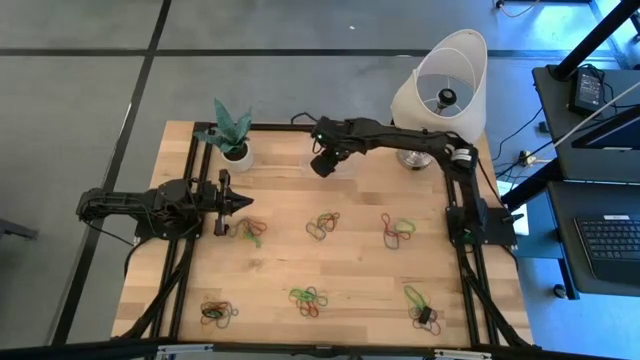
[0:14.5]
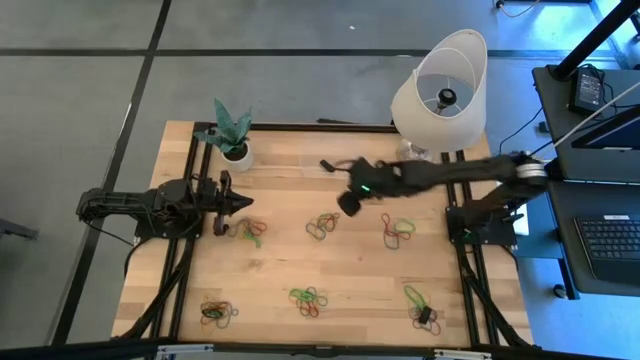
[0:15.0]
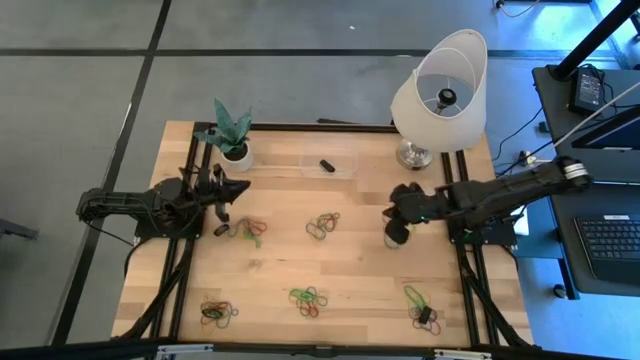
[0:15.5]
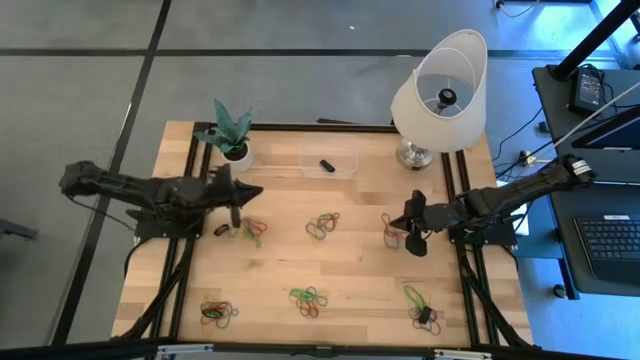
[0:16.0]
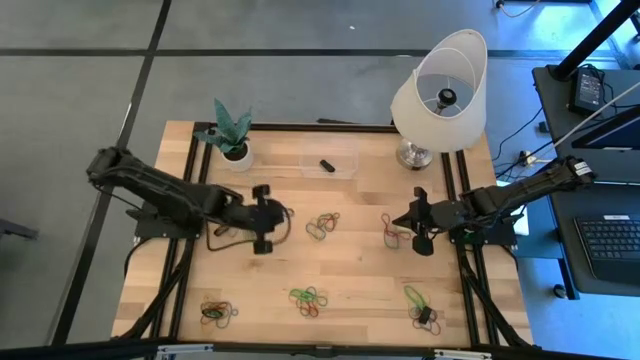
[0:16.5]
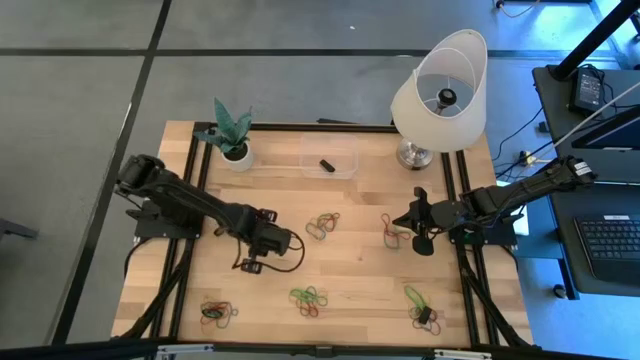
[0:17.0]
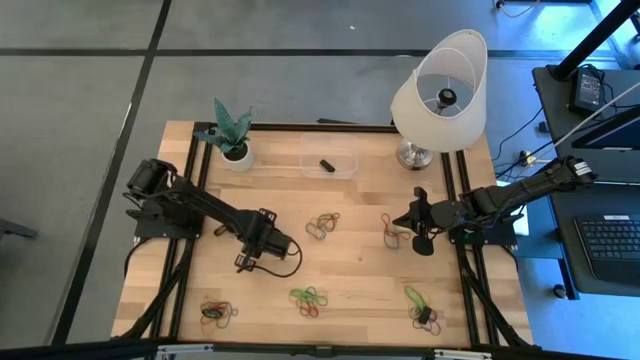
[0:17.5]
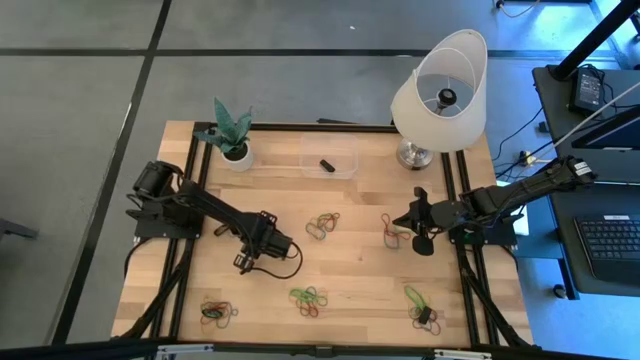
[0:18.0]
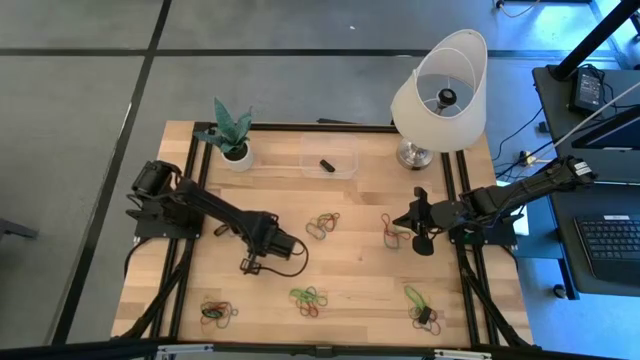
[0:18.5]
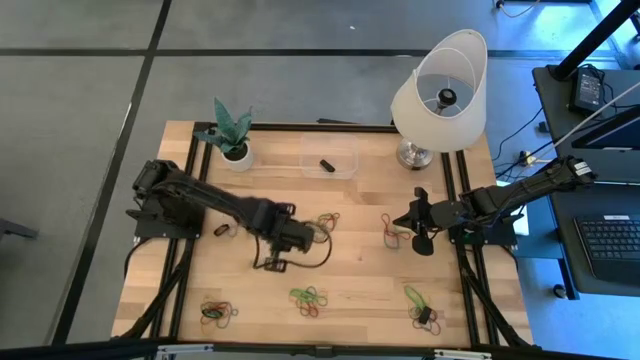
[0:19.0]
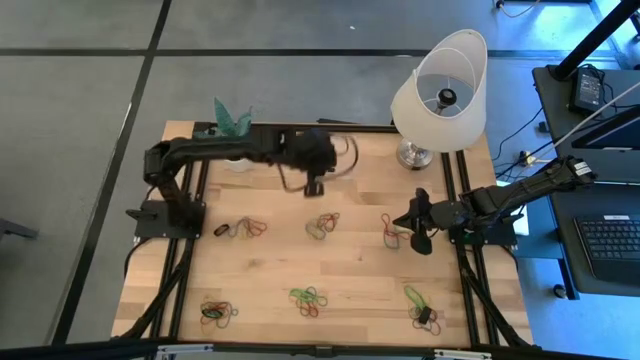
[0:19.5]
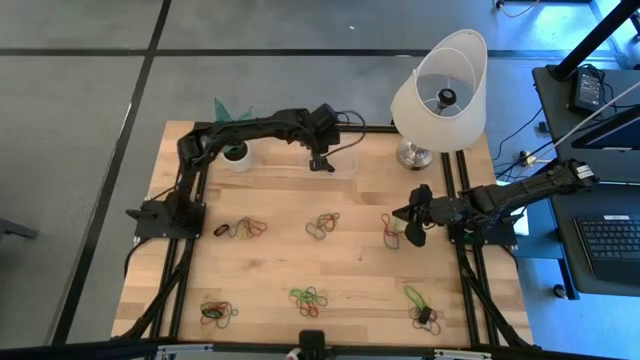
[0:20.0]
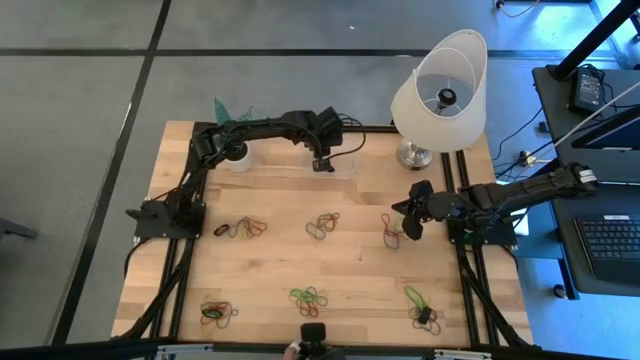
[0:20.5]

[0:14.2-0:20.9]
Task: Pick and place rubber bands into bin
Put the green rubber band into the transparent bin

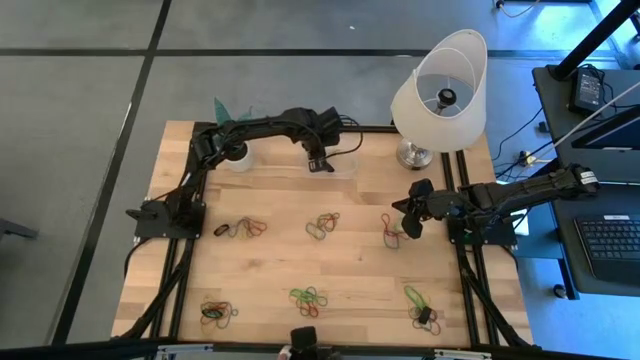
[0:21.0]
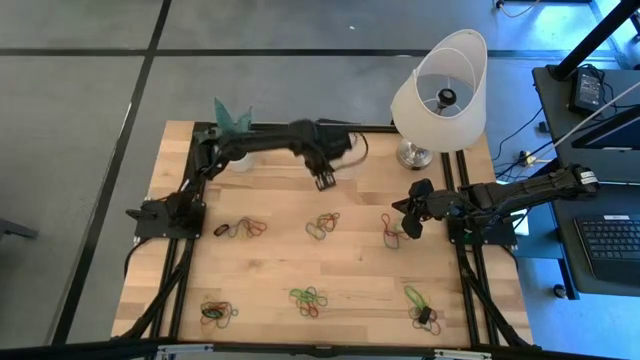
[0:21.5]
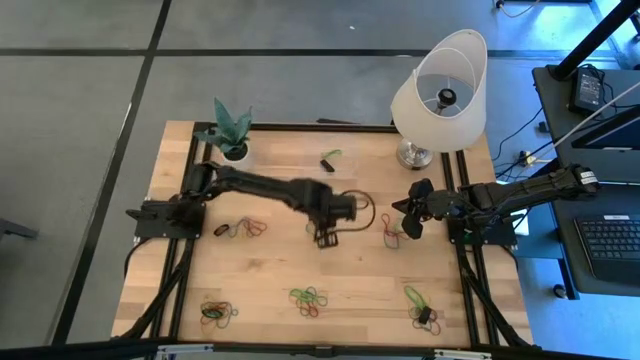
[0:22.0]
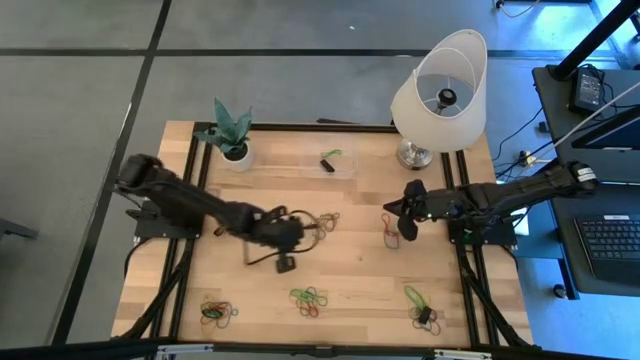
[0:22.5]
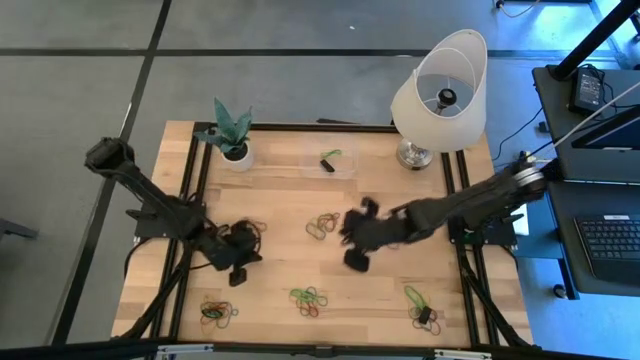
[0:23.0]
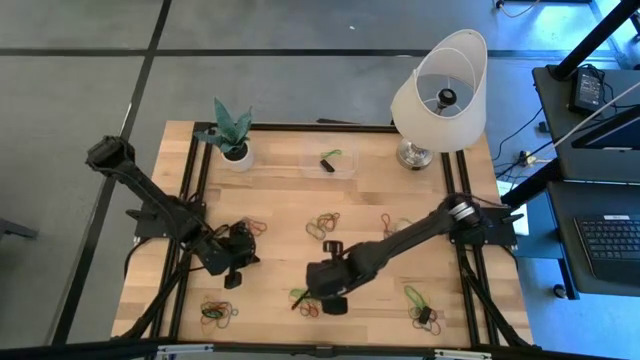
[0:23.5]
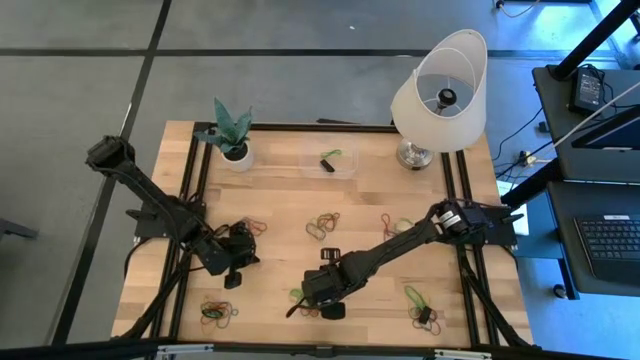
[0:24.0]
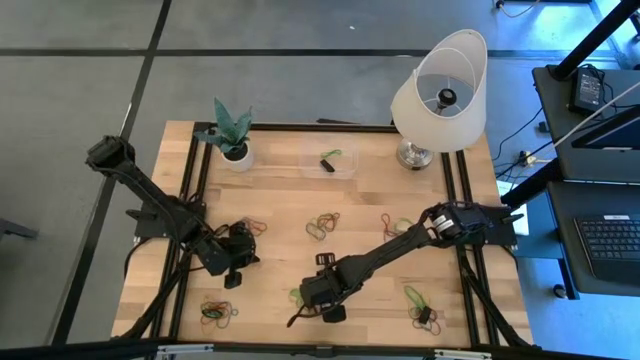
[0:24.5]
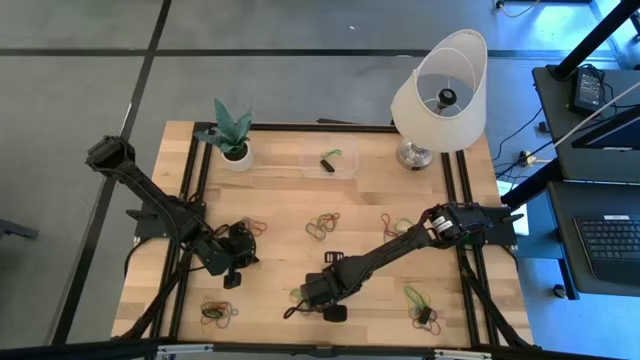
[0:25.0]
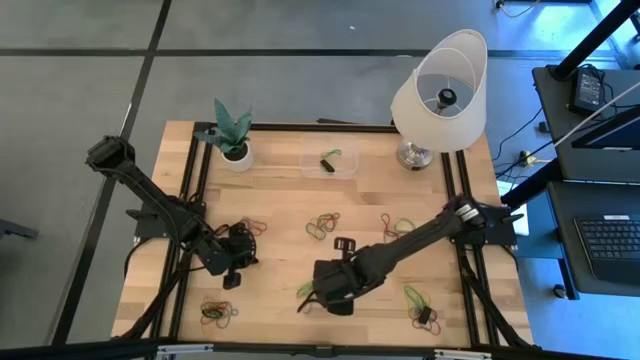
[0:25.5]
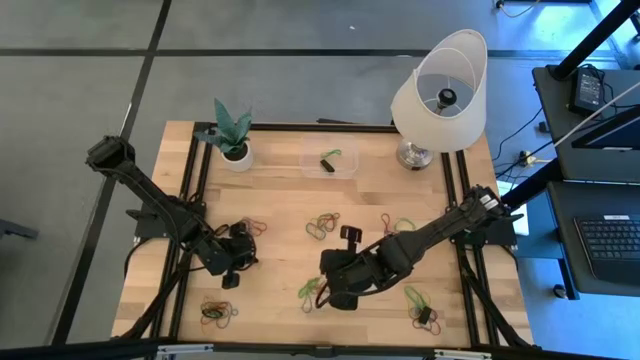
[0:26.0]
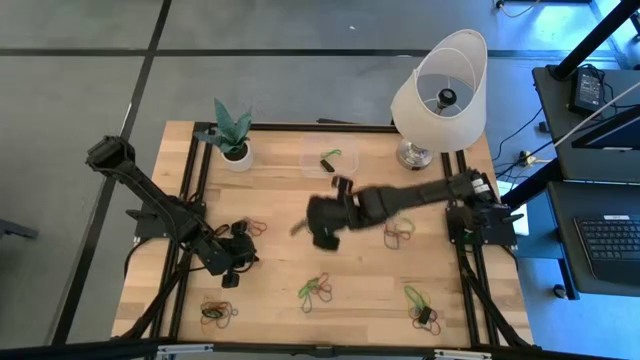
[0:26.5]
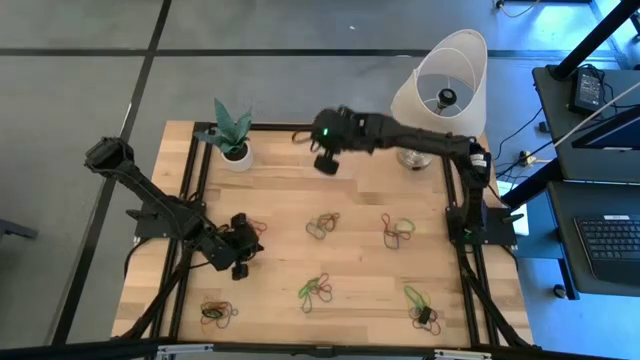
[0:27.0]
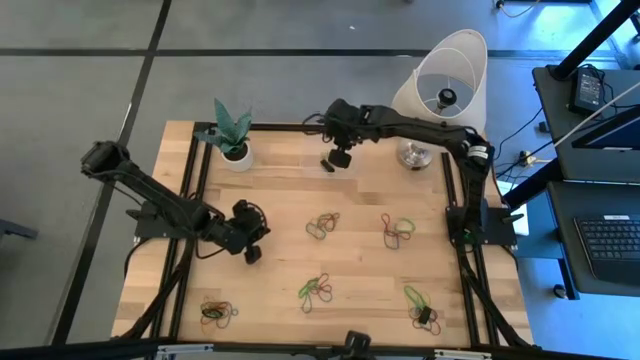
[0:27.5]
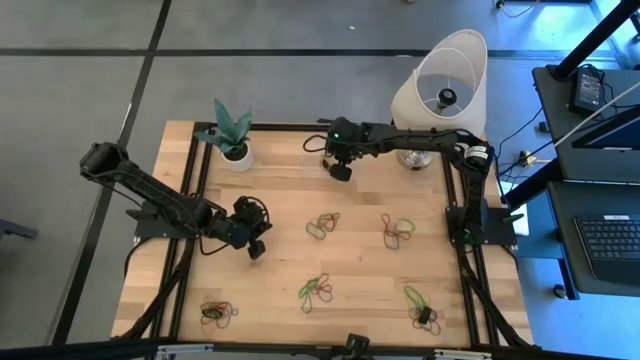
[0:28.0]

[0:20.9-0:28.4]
Put the yellow rubber band into the transparent bin

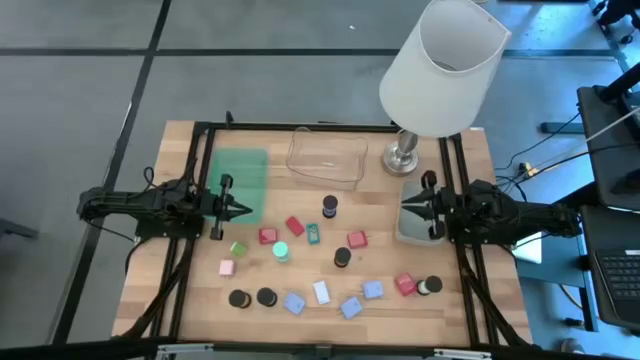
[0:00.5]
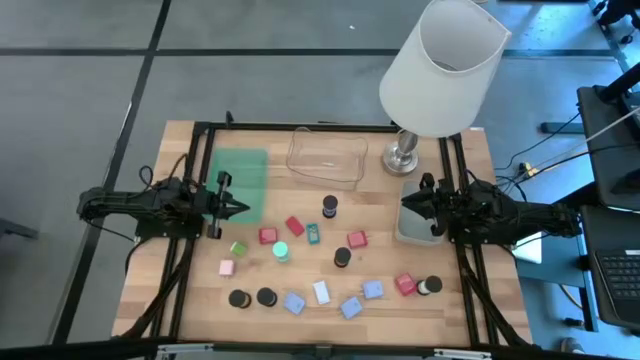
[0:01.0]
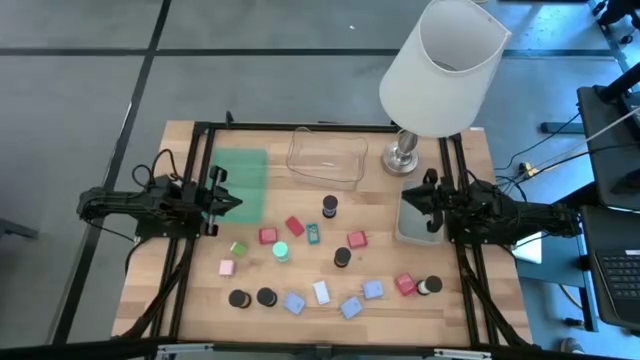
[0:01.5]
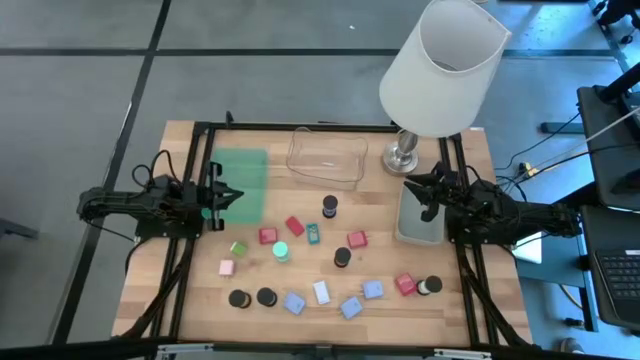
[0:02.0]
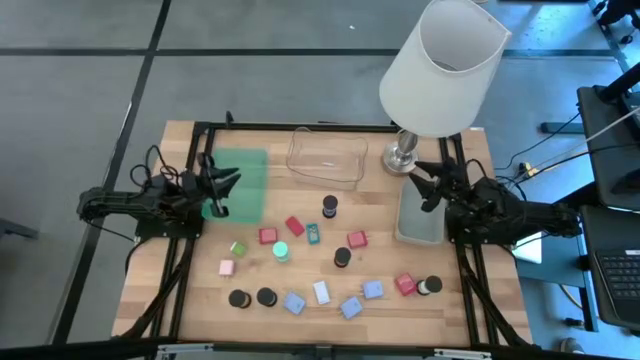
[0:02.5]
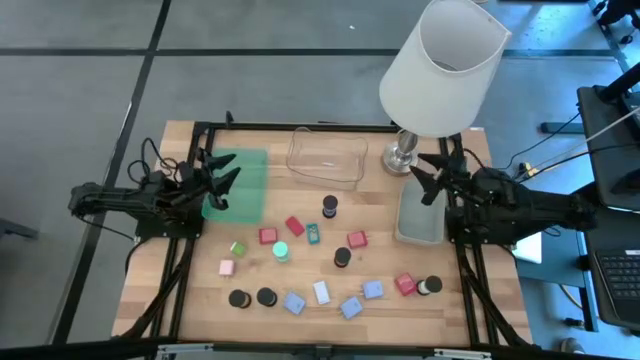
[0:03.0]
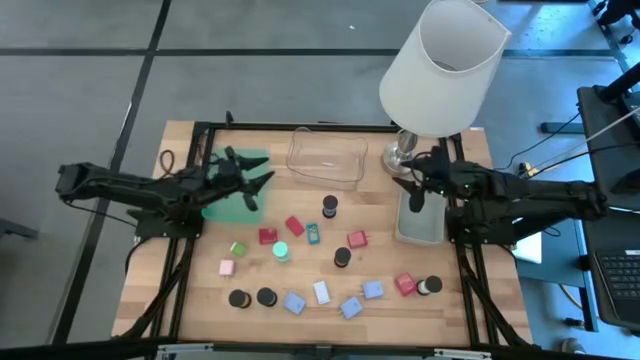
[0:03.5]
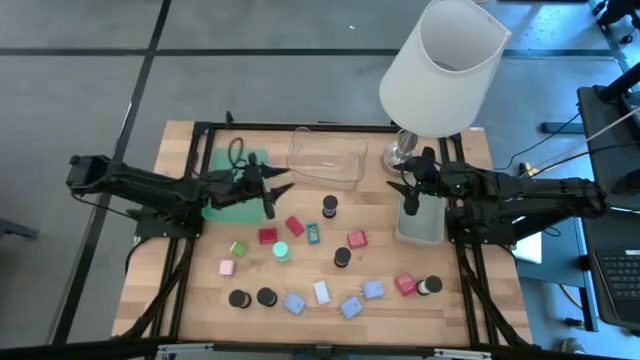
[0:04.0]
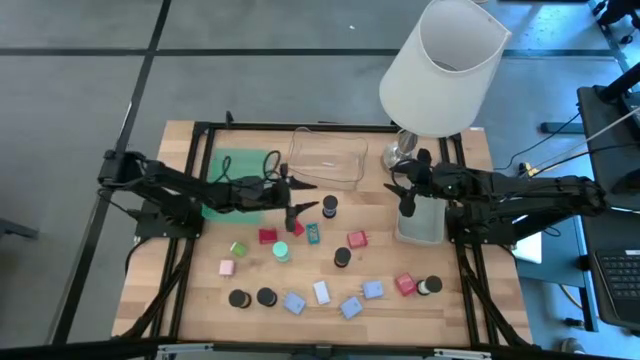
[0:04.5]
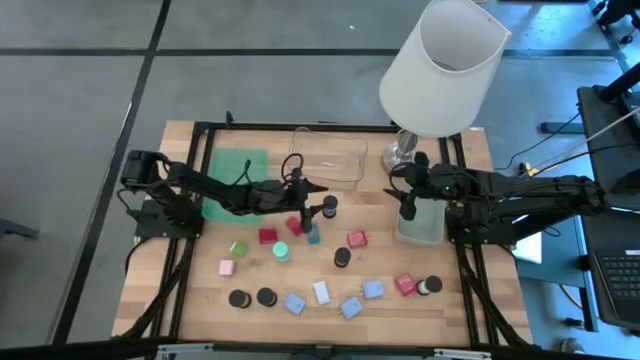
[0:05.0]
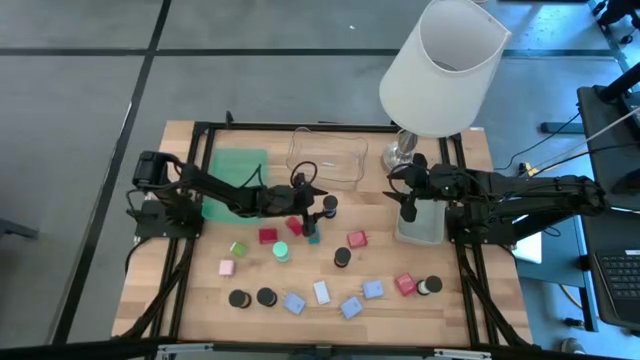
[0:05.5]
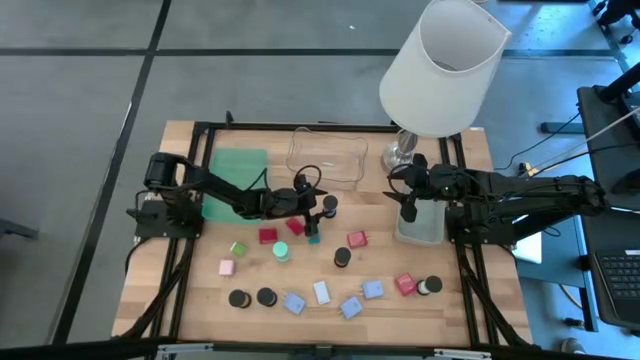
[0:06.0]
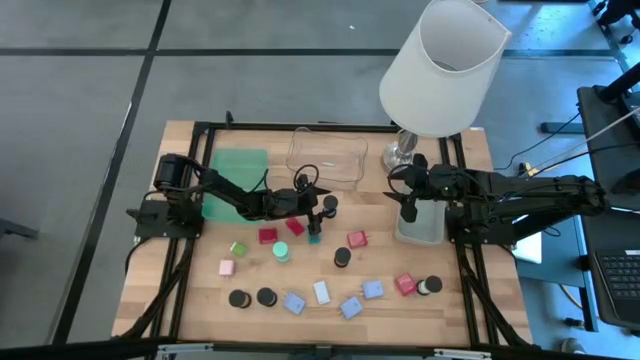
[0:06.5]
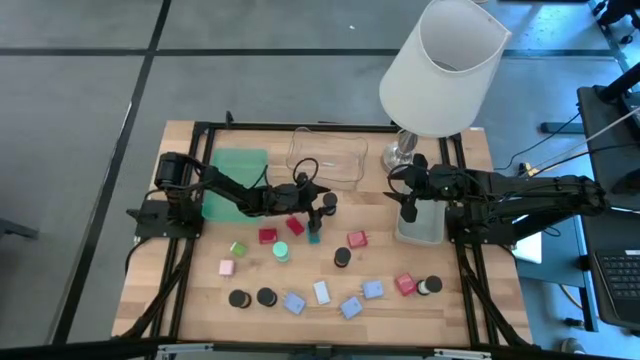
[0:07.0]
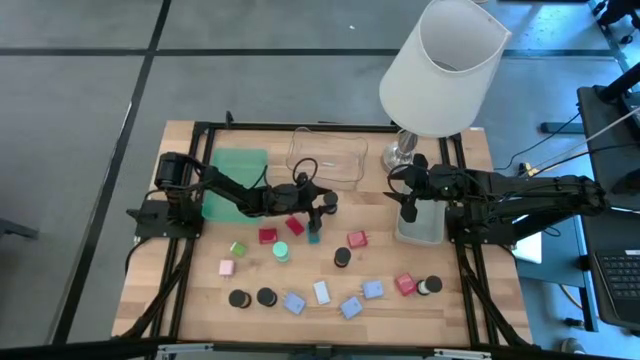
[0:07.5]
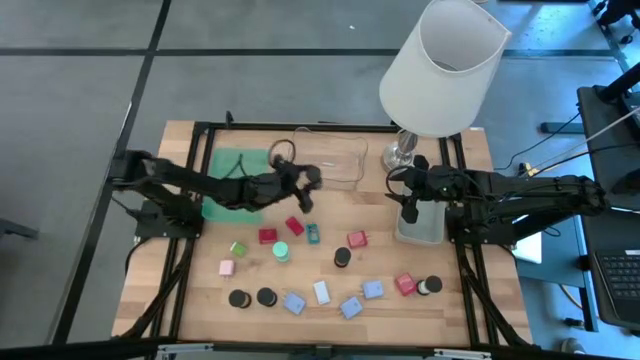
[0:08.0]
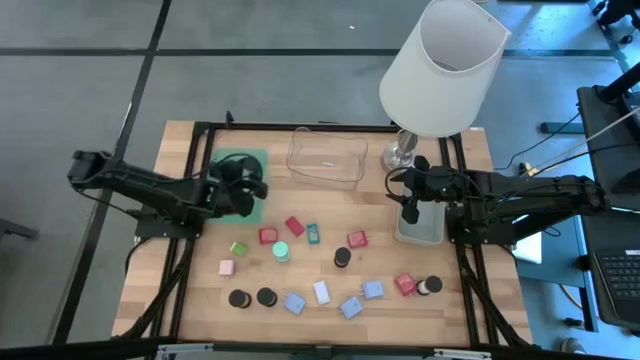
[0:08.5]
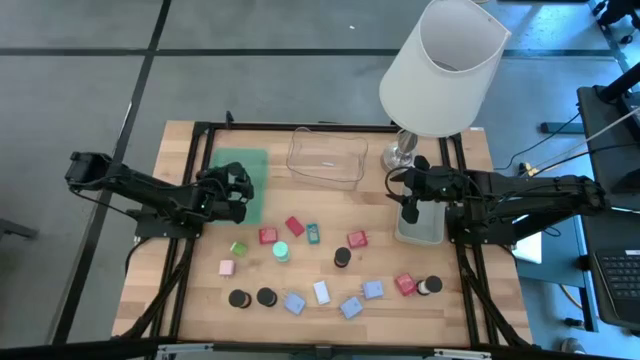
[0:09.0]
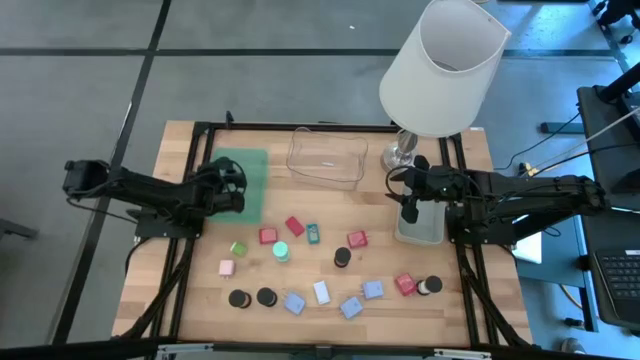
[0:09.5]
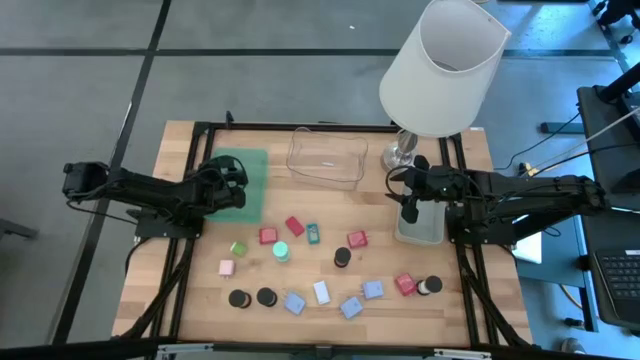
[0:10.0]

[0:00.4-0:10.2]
Task: Pick & Place Office items
Put the top blue hourglass into the green bin
